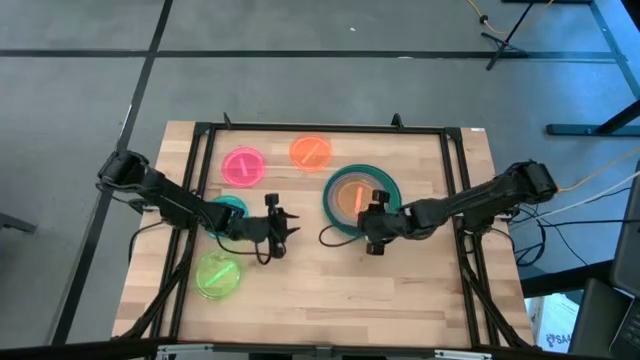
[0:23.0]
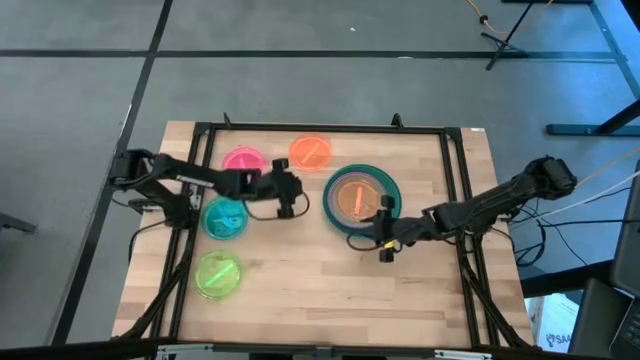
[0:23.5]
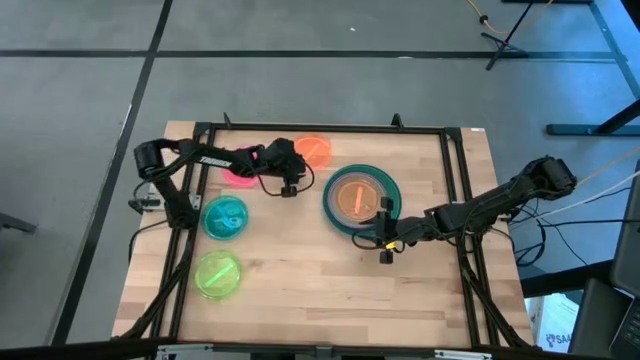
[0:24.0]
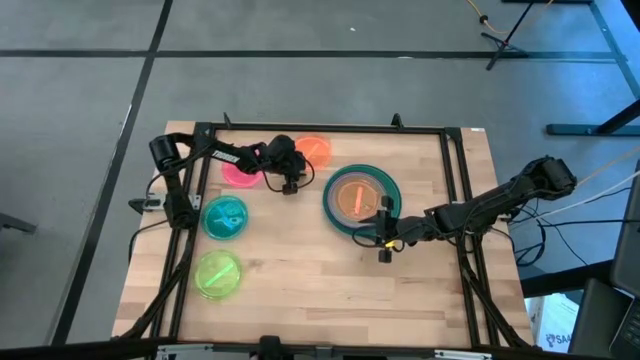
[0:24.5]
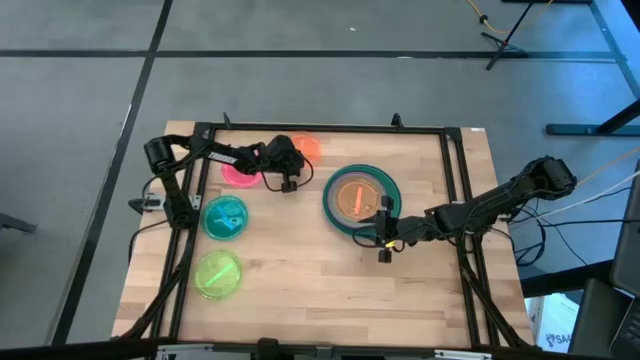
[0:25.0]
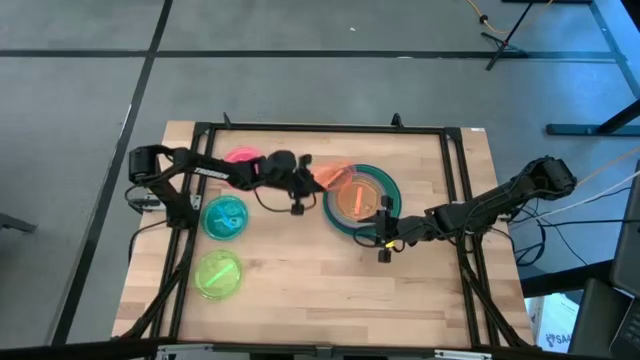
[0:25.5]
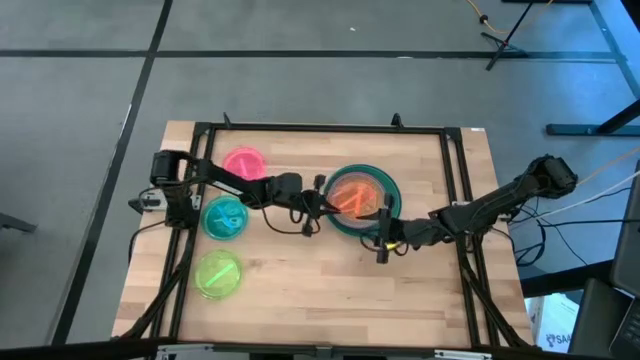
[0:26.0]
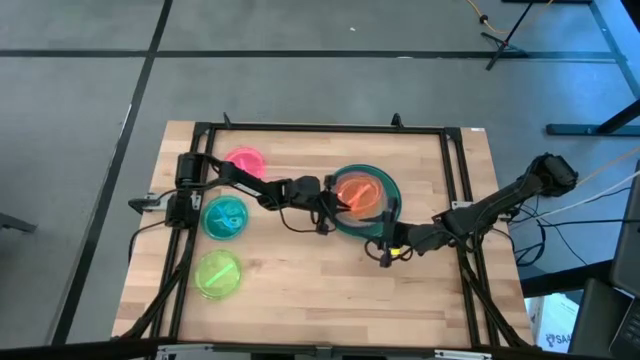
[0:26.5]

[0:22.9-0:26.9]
Task: Stack plastic plates
Stack the orange plate on top of the orange plate

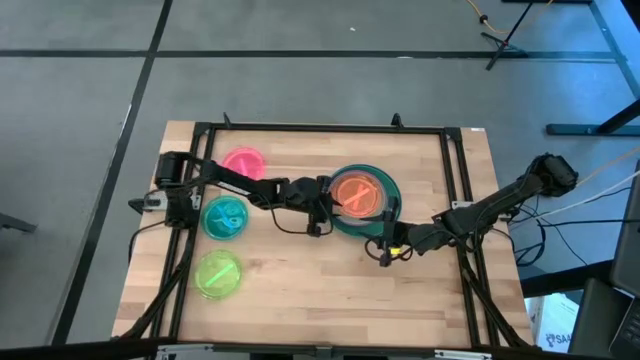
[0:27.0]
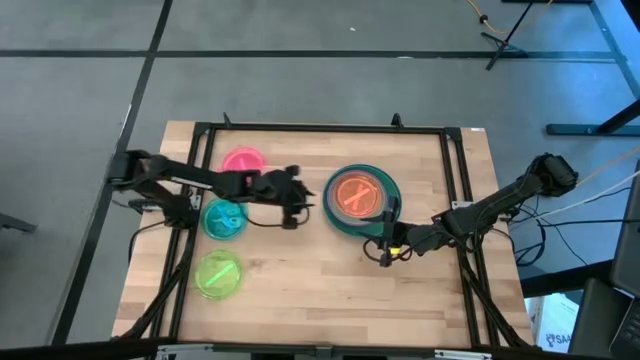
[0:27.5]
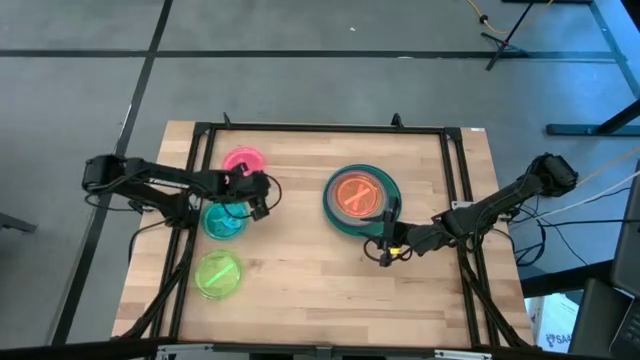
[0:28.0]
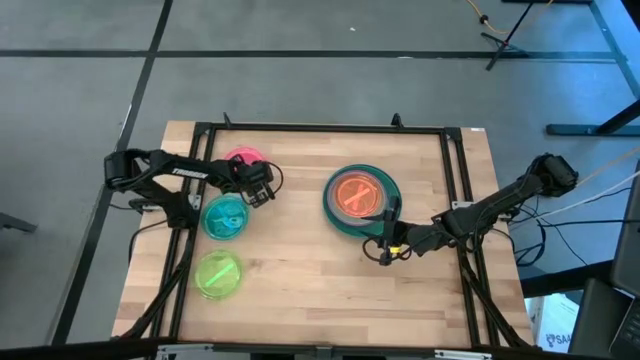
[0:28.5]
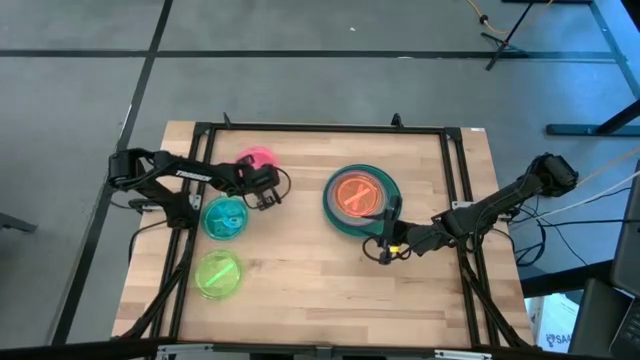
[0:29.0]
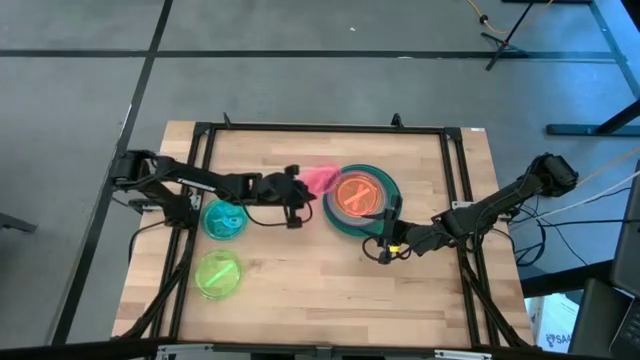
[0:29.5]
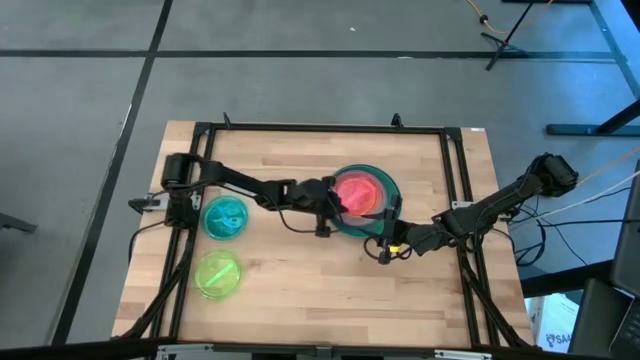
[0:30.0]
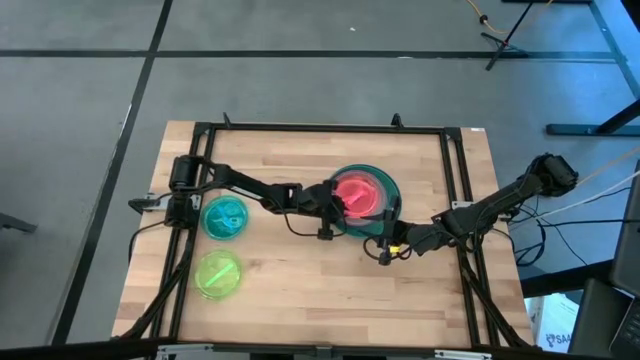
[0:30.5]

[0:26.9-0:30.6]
Stack the light pink plate on top of the orange plate

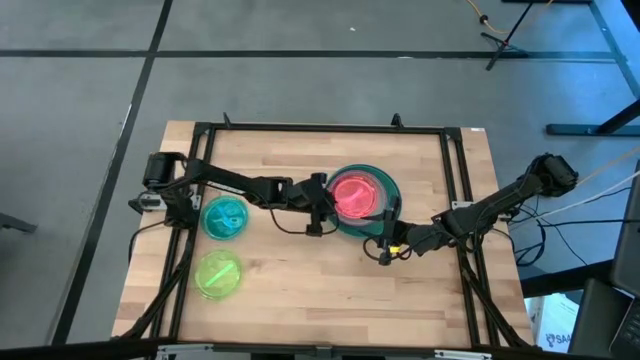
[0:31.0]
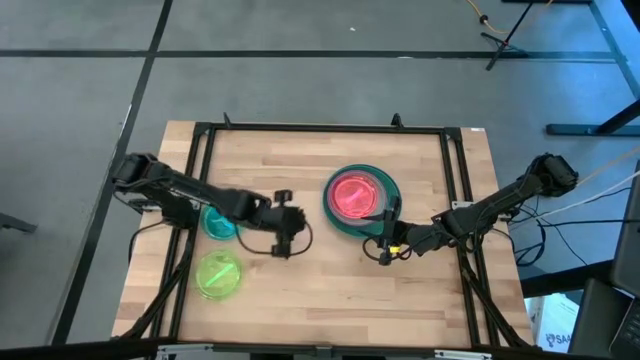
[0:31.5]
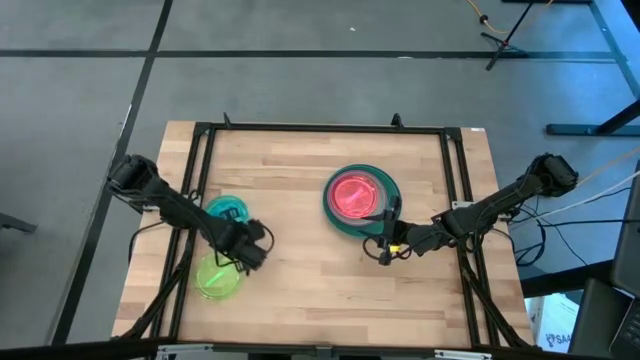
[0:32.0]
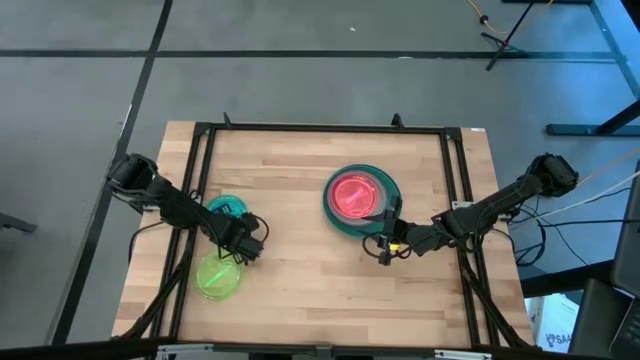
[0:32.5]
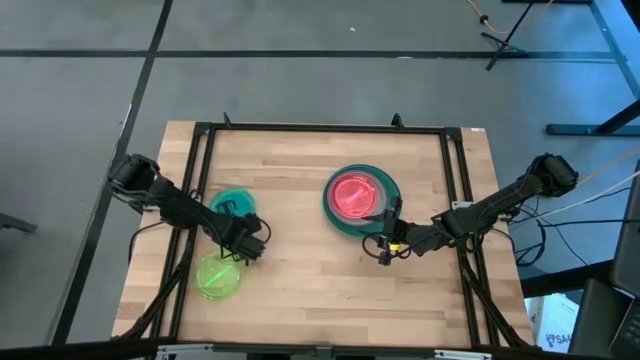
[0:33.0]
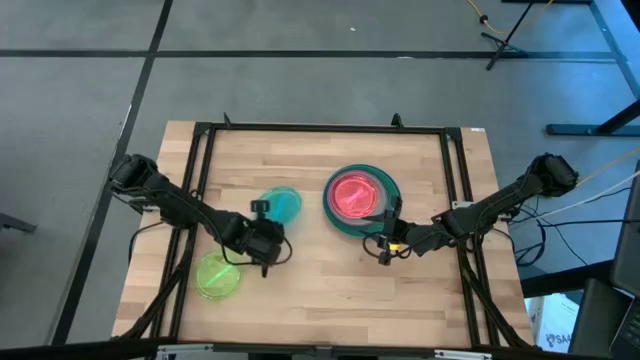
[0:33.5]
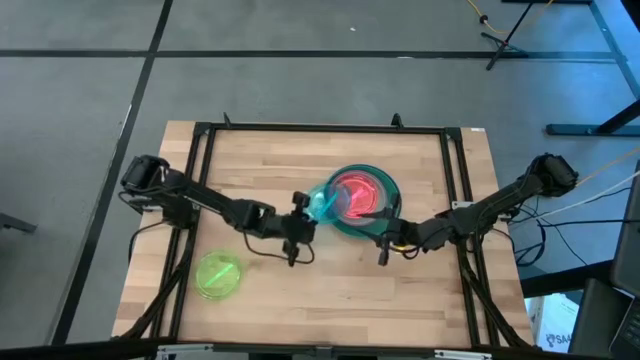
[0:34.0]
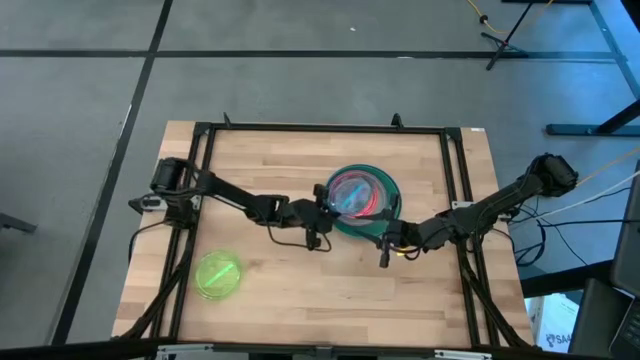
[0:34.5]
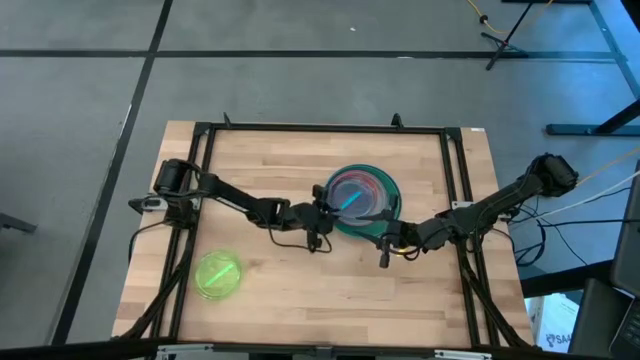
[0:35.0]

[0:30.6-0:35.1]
Stack the blue plate on top of the light pink plate

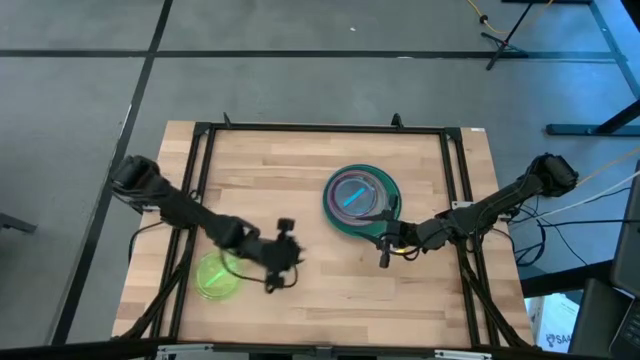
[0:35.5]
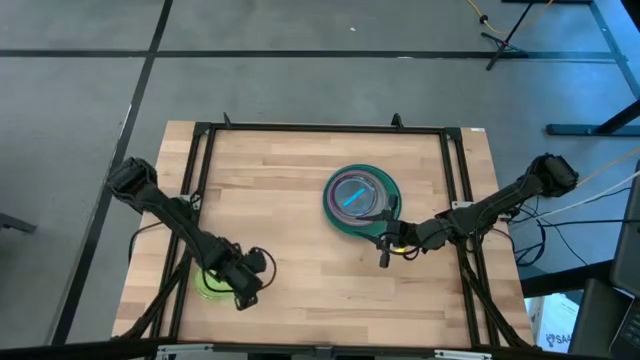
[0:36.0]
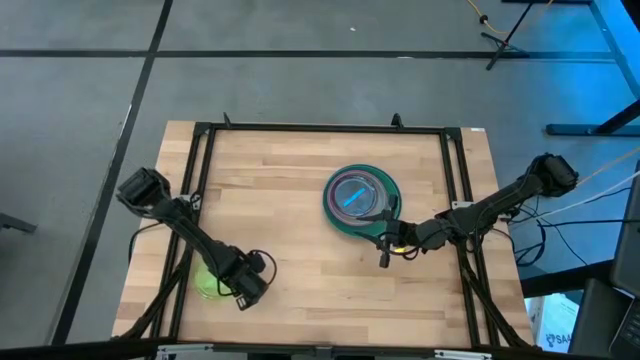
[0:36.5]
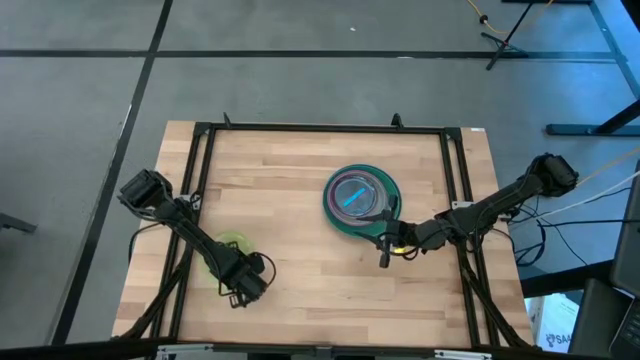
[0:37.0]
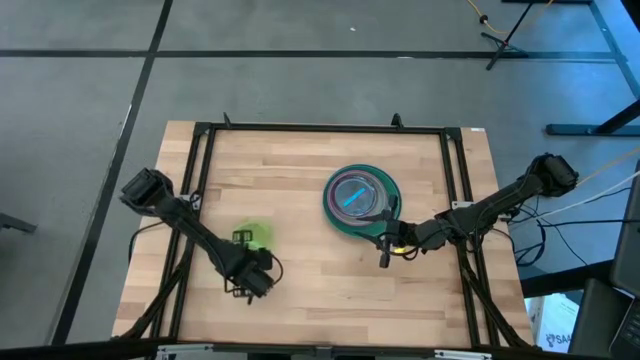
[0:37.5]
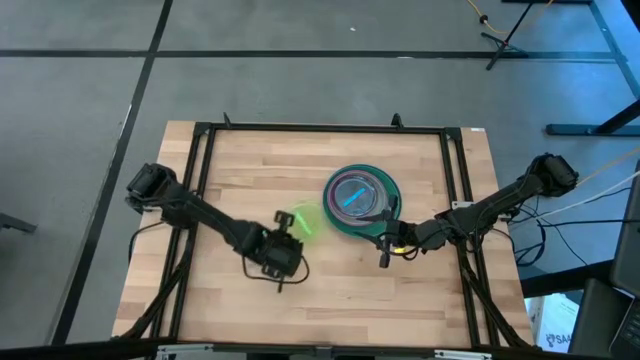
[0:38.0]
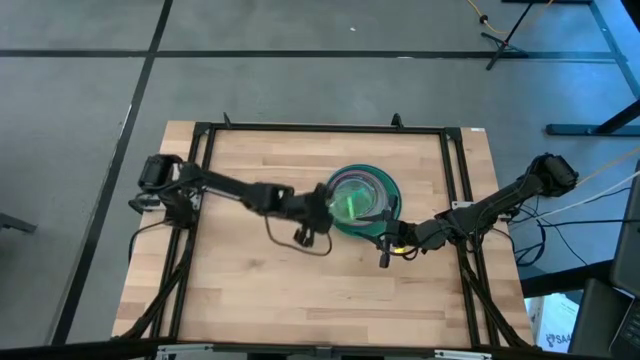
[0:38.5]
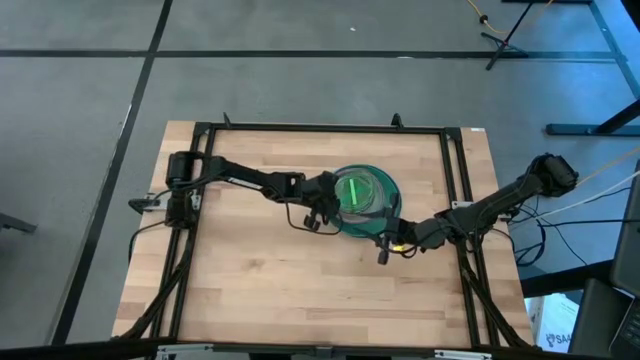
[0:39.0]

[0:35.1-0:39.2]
Stack the light green plate on top of the blue plate

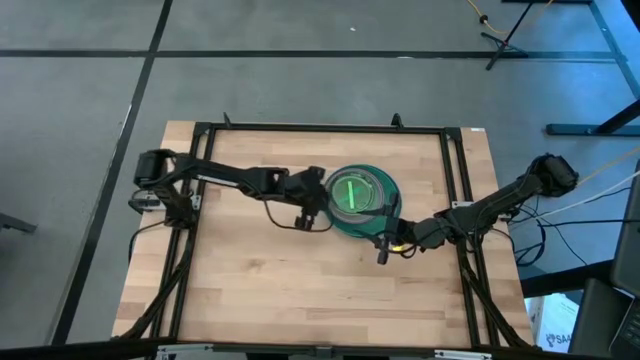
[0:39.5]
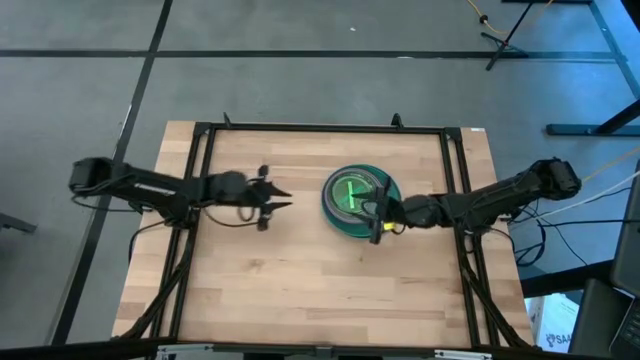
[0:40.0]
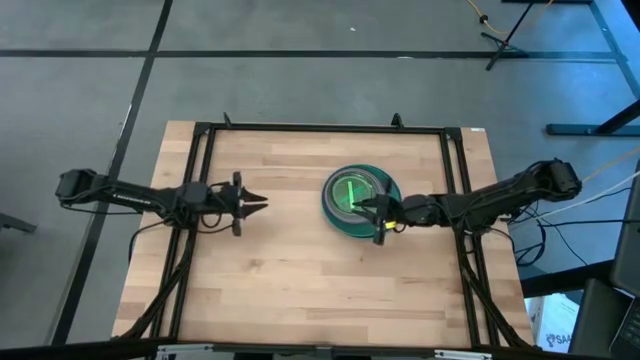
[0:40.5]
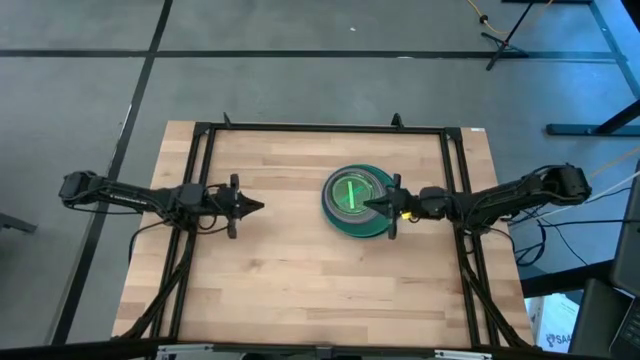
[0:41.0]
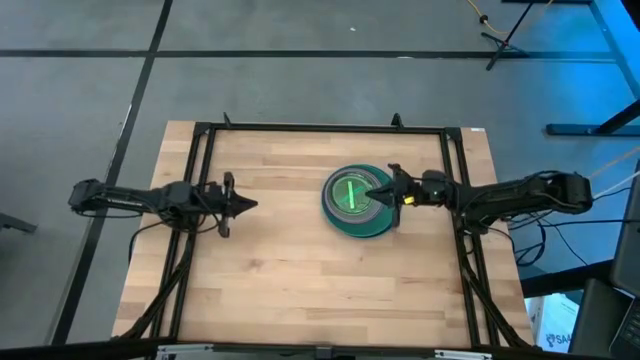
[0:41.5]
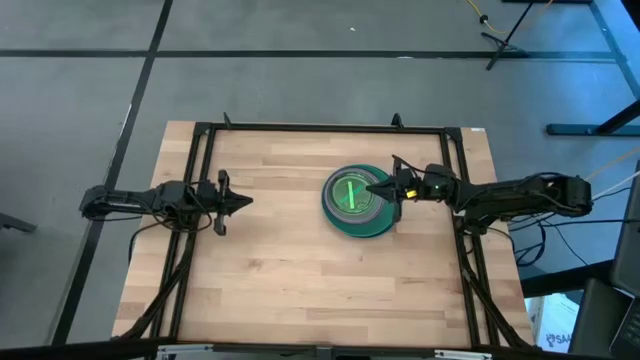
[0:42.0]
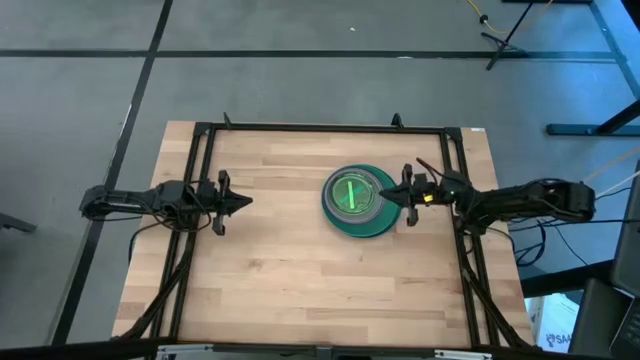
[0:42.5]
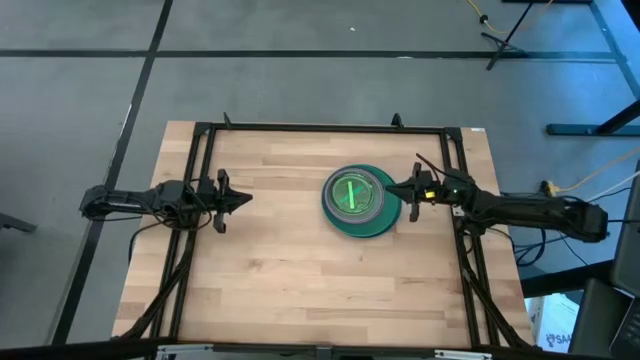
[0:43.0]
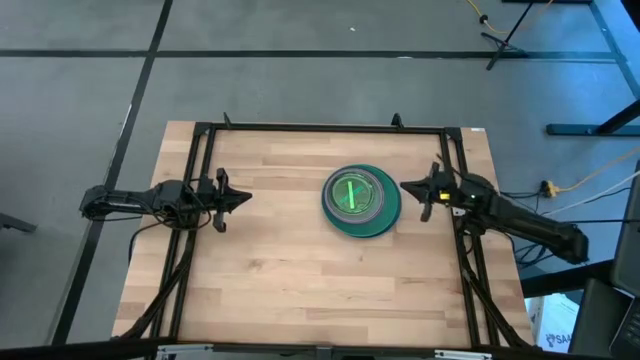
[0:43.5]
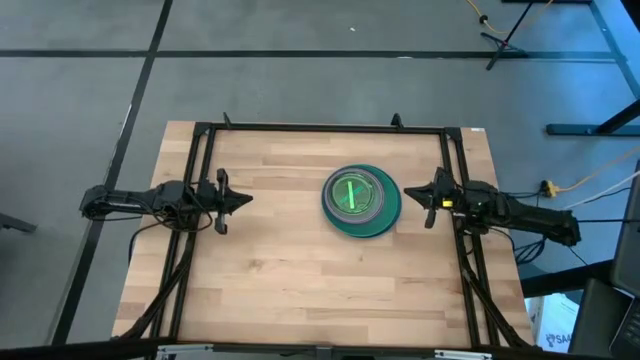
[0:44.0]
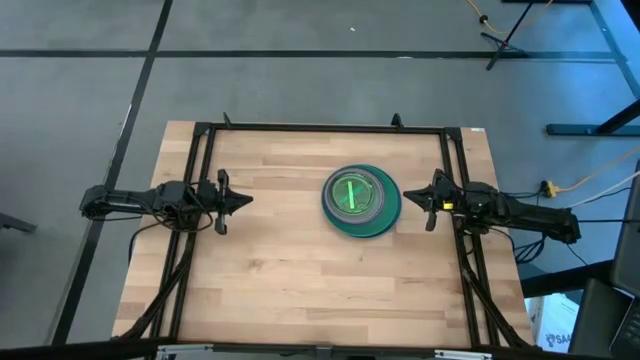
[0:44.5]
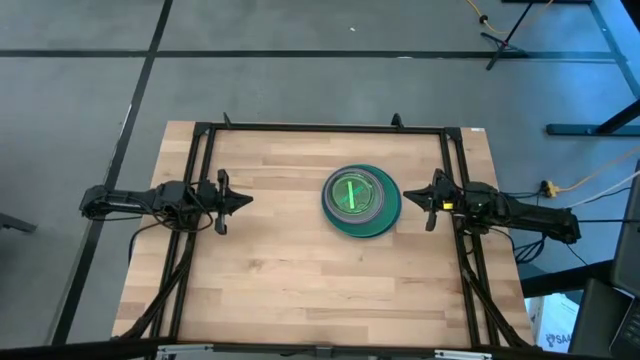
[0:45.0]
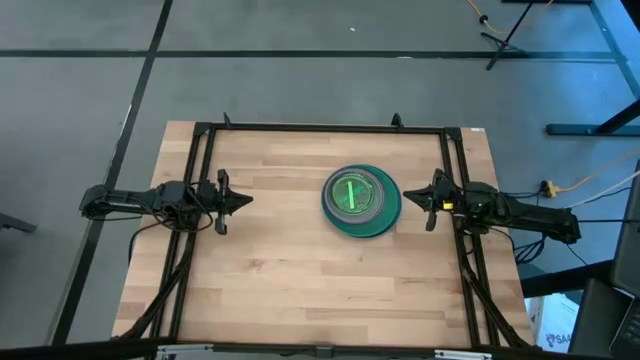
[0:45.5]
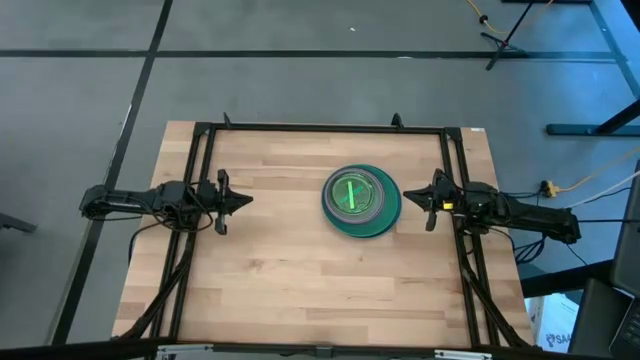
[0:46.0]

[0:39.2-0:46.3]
Return to Home Position
